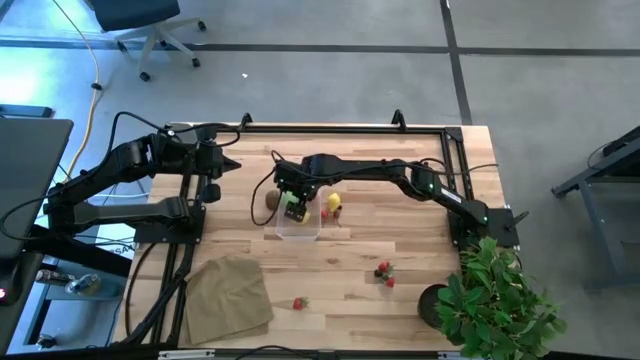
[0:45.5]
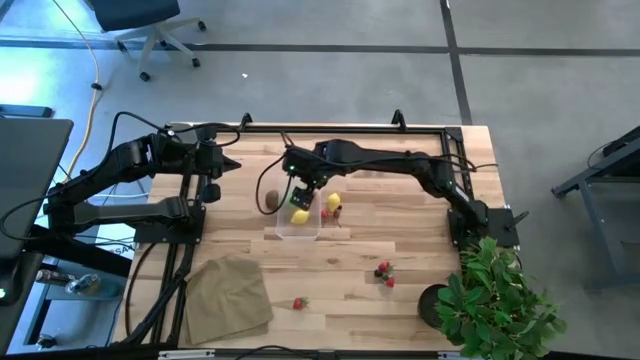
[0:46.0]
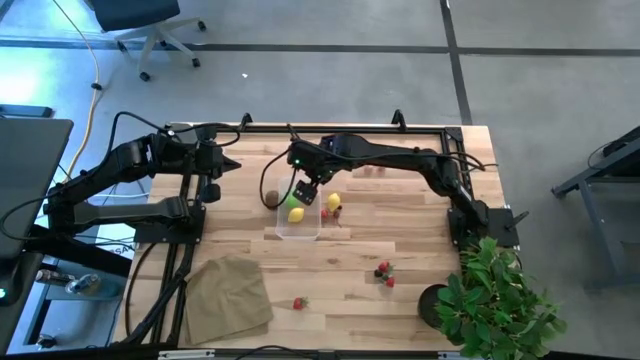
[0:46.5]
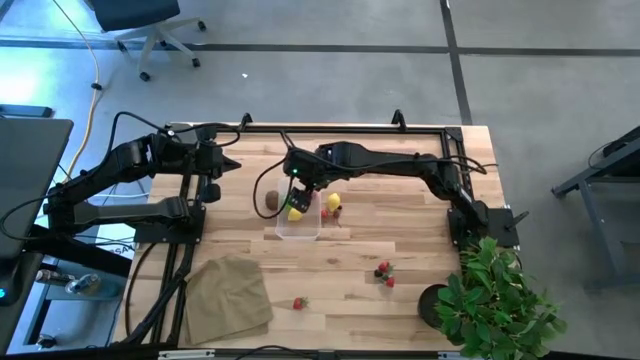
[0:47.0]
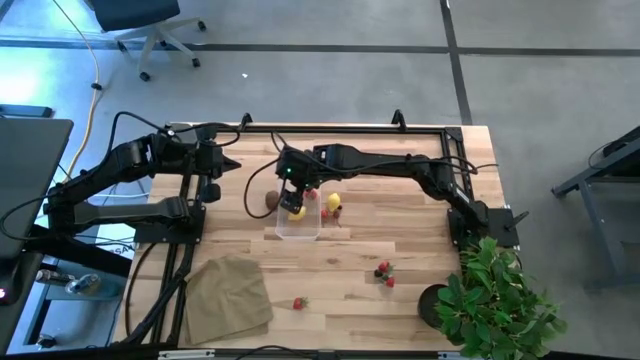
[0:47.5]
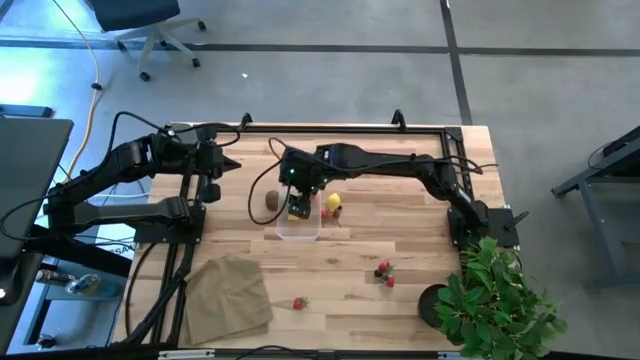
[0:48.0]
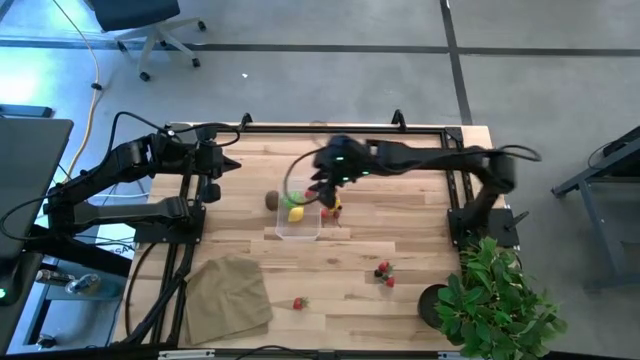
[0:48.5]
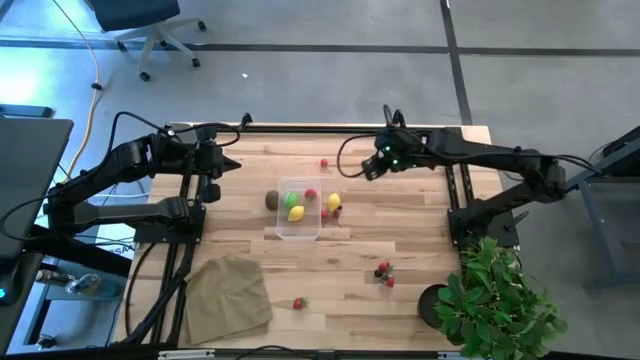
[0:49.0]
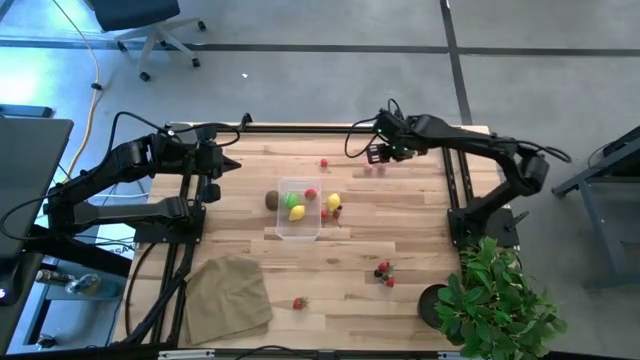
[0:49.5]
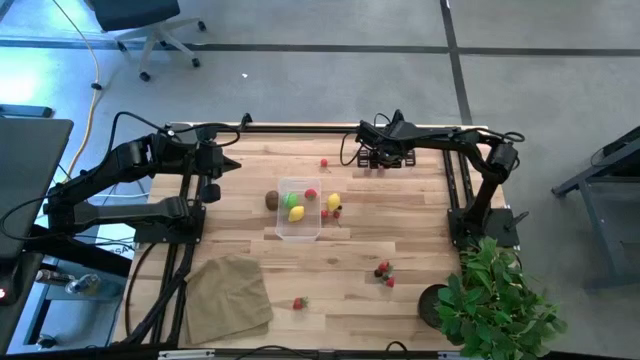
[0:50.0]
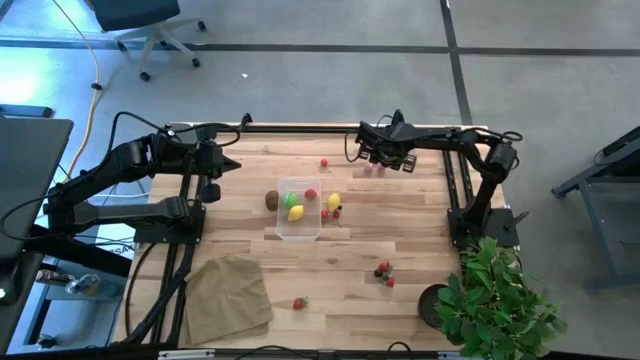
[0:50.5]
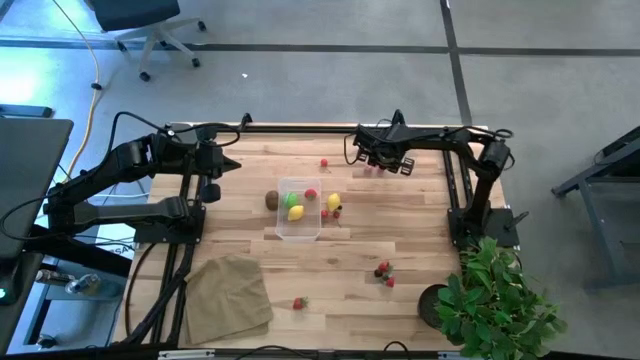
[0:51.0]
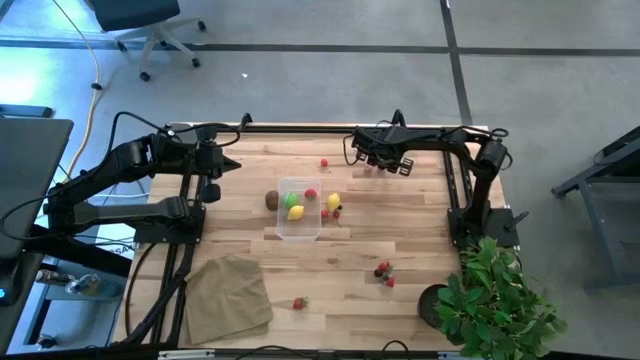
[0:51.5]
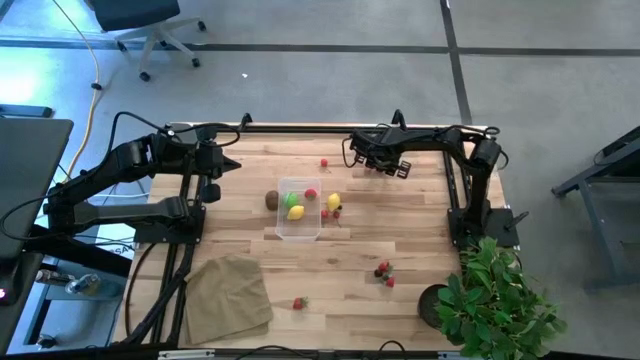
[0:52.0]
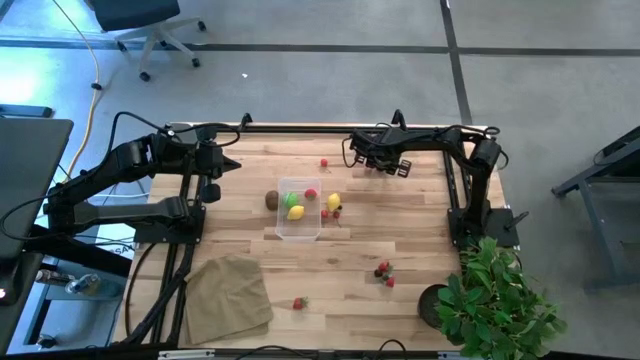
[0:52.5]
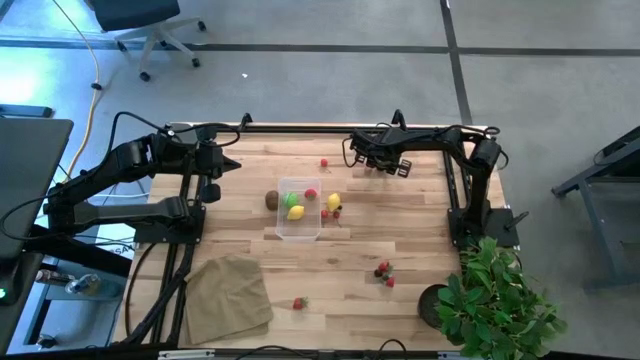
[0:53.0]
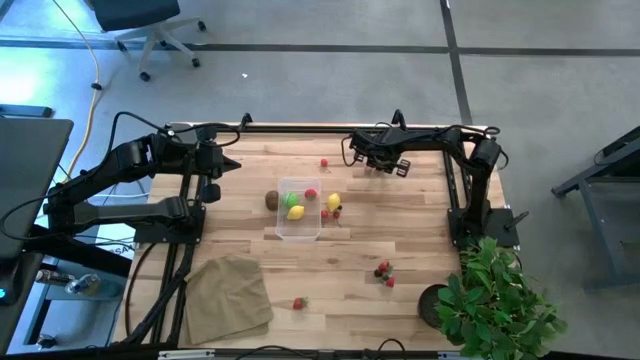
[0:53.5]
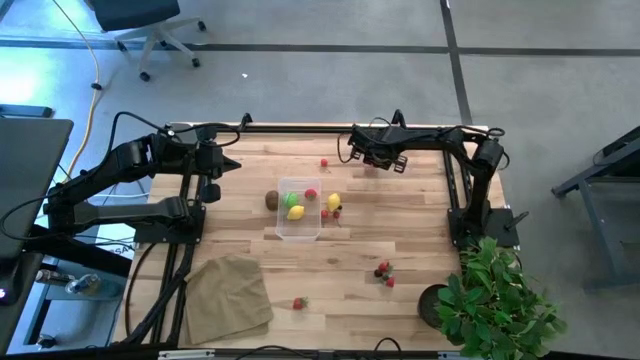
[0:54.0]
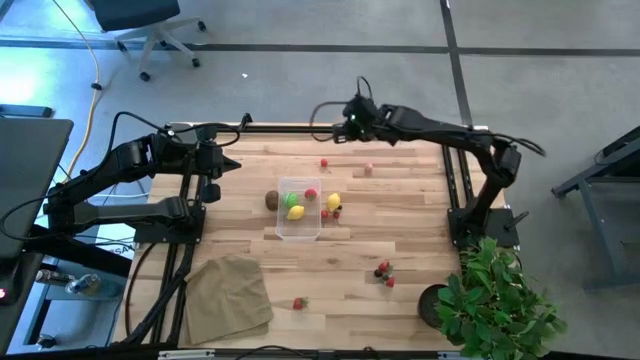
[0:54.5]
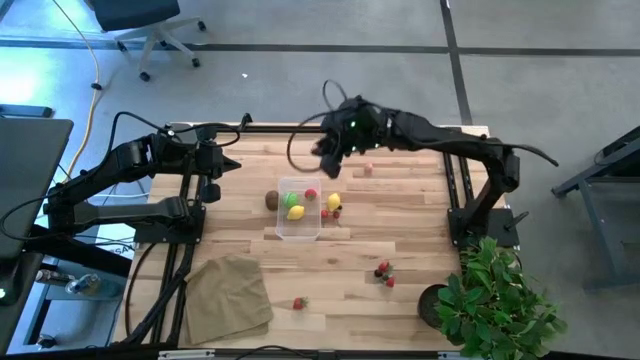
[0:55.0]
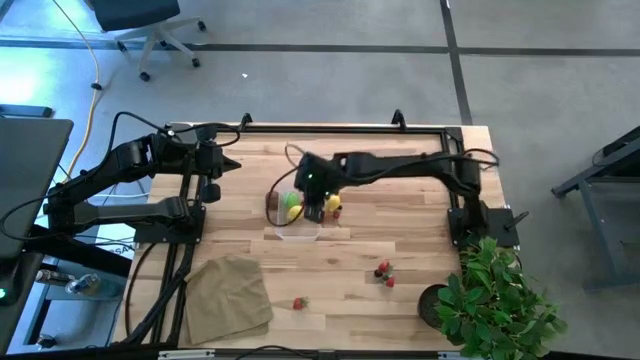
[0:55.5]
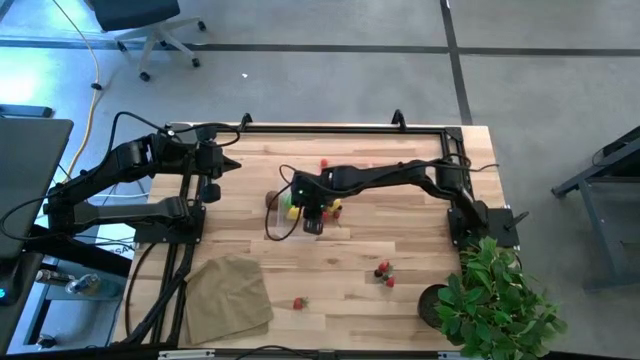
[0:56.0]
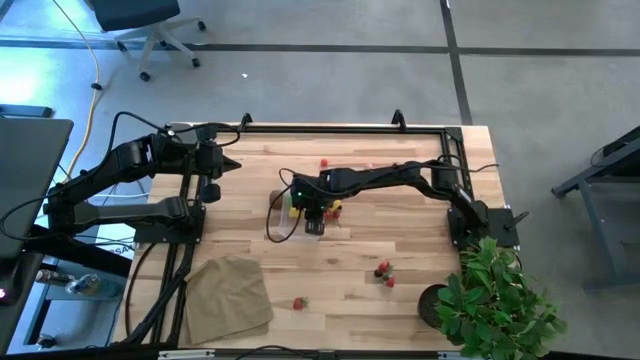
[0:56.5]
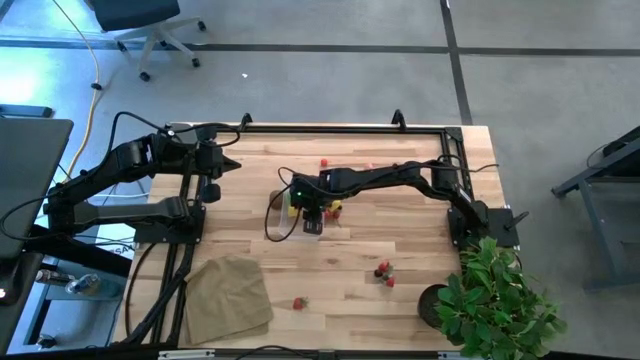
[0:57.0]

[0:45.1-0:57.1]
Task: Pick and placing Produce into tupperware
Put the peach into the transparent bin

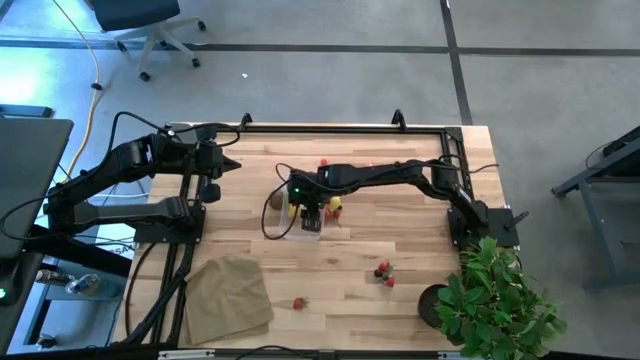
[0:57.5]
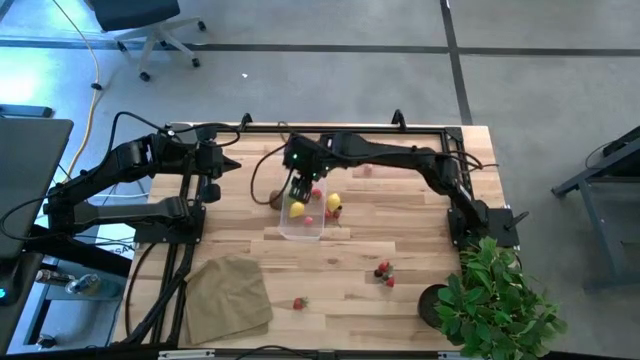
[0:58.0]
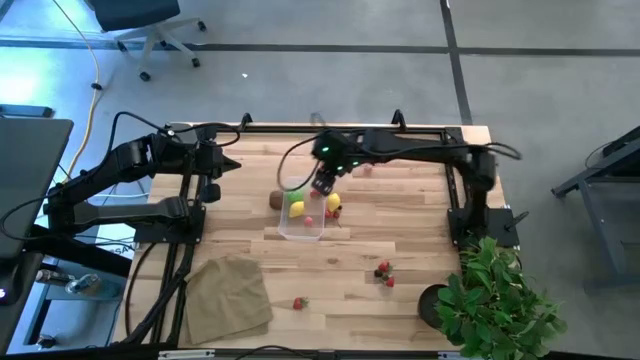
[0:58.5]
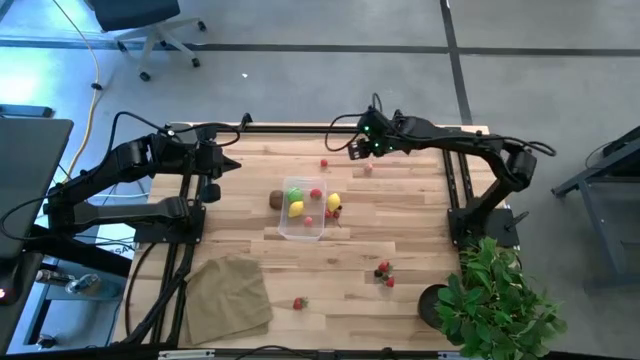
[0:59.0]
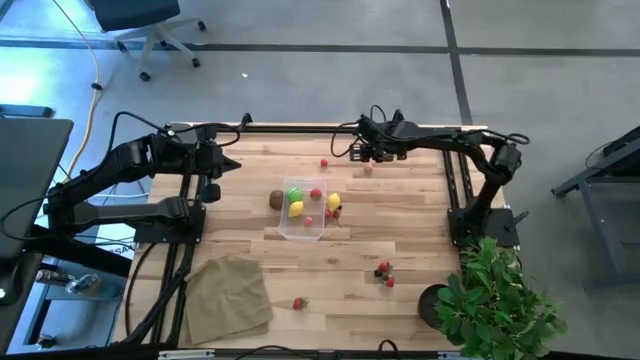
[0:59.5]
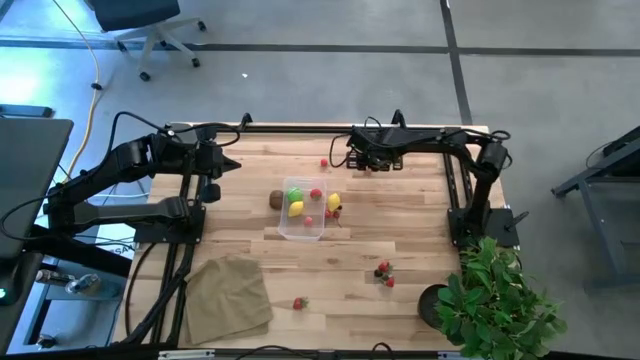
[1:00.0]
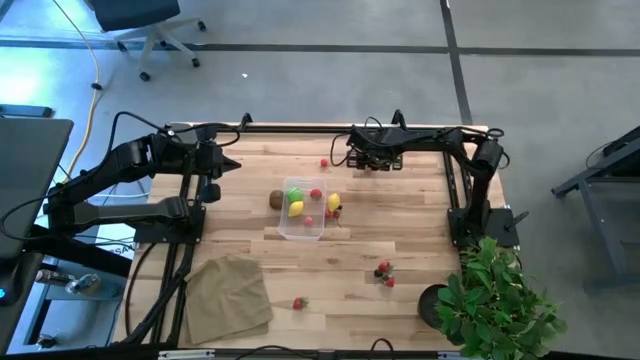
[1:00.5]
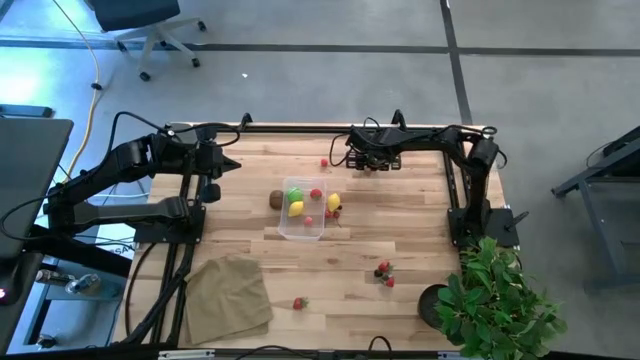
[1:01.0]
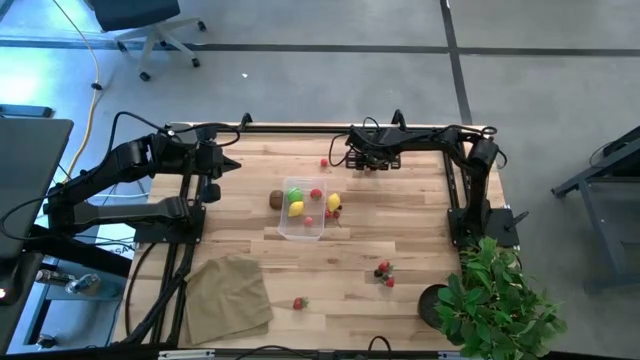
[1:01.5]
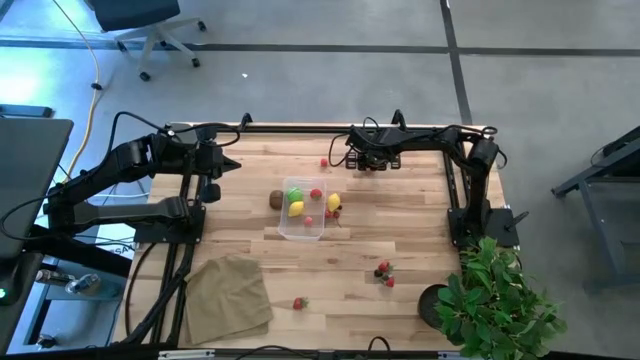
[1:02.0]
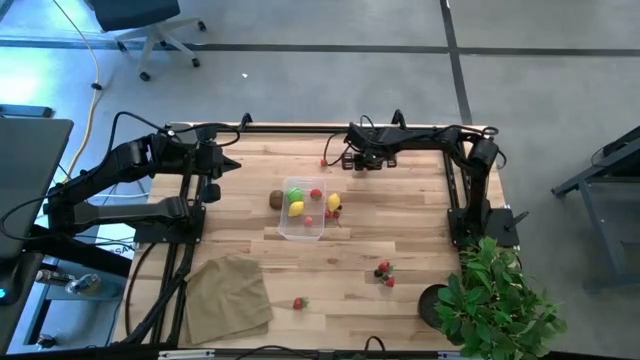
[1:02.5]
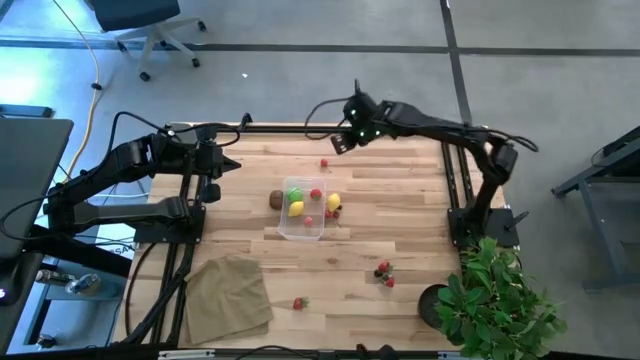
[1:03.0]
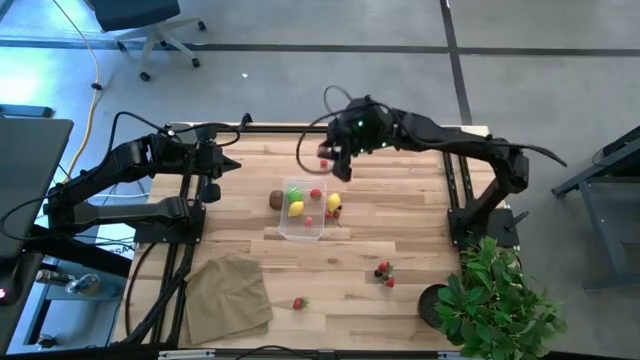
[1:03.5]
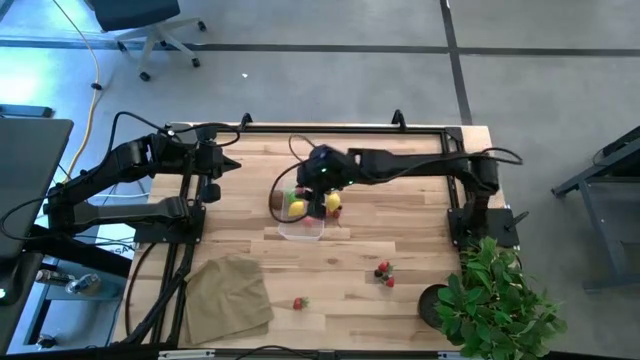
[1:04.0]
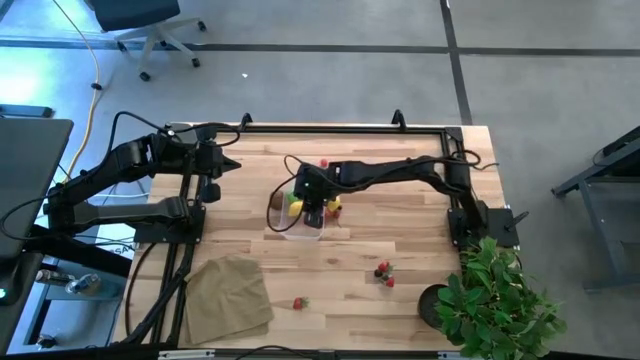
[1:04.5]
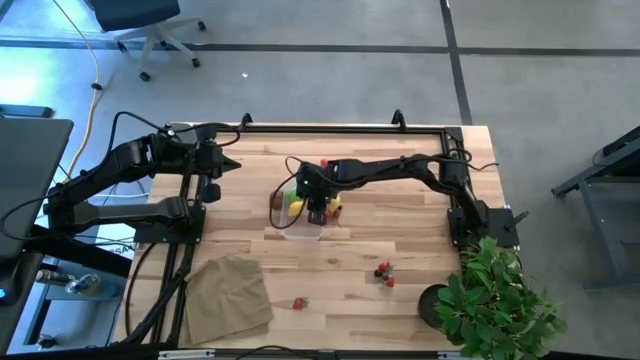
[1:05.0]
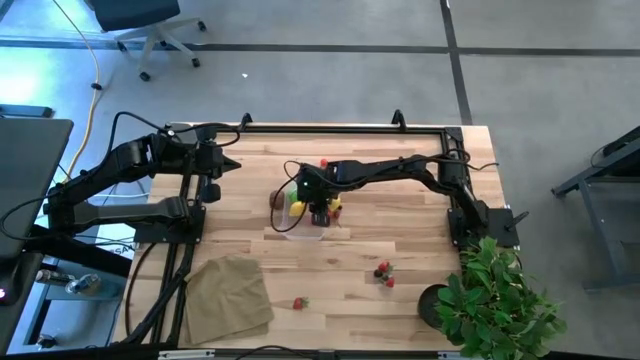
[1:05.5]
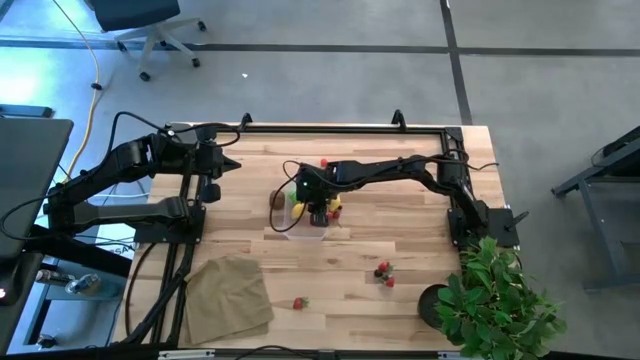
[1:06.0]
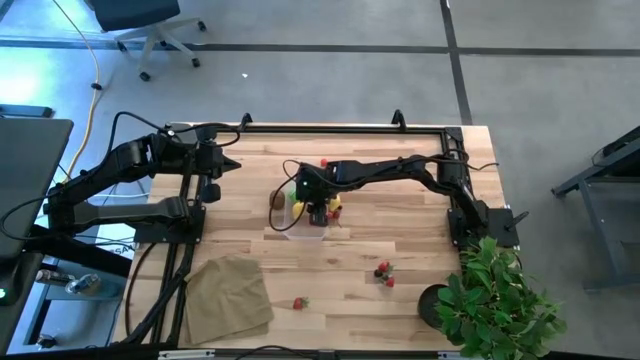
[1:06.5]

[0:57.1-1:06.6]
Put the peach into the transparent bin
